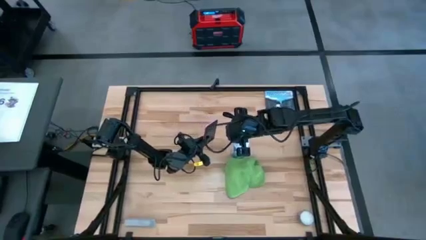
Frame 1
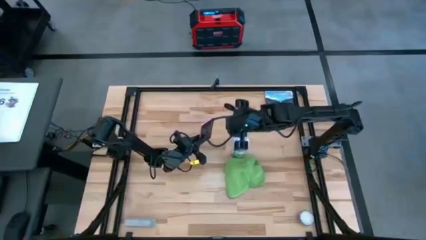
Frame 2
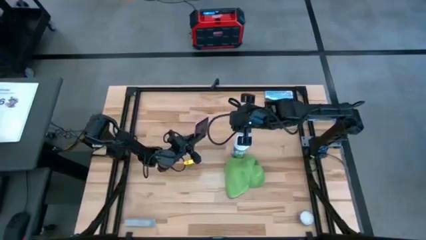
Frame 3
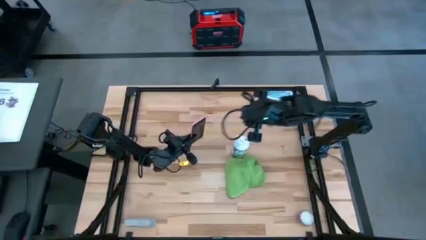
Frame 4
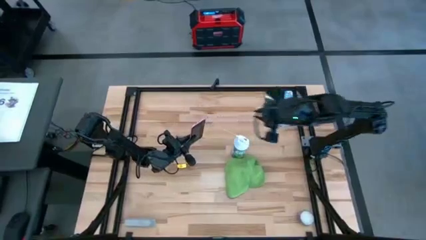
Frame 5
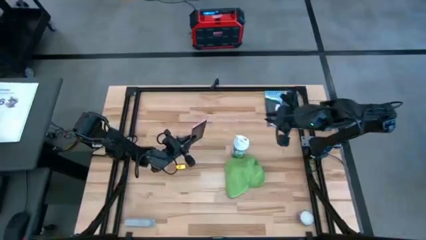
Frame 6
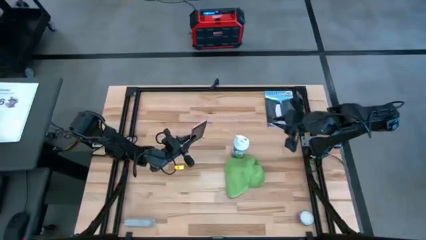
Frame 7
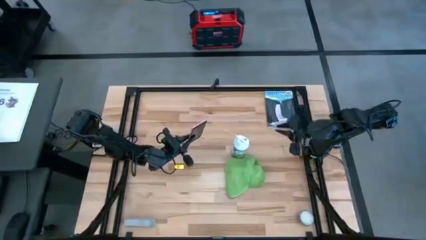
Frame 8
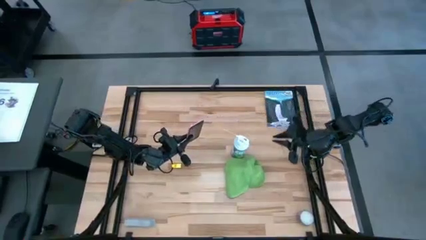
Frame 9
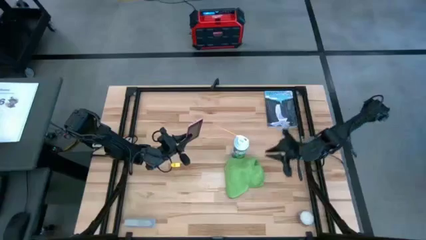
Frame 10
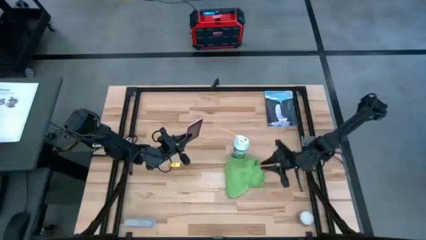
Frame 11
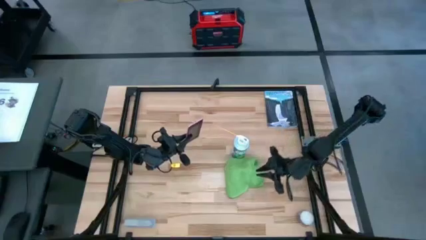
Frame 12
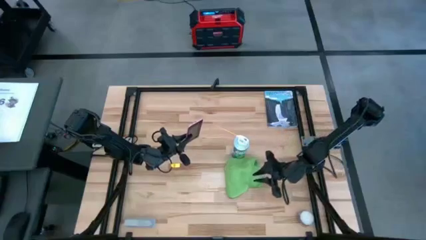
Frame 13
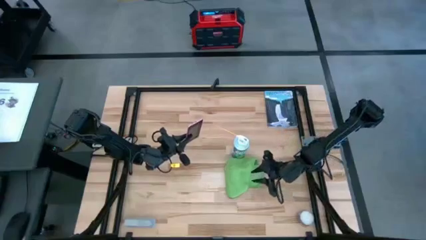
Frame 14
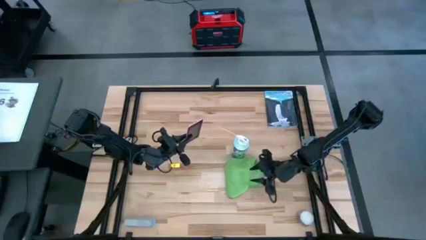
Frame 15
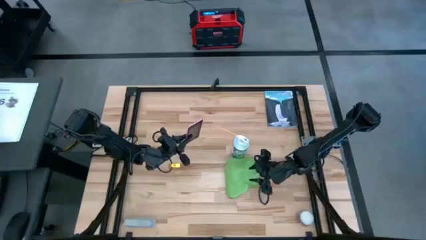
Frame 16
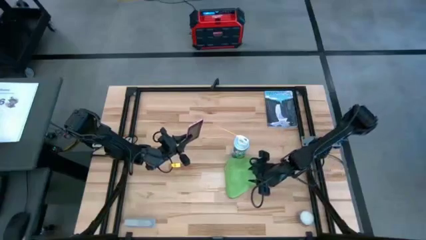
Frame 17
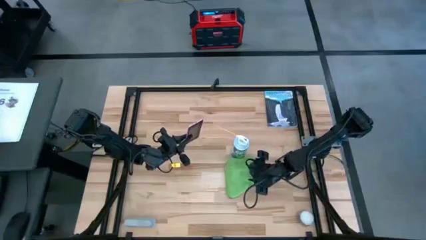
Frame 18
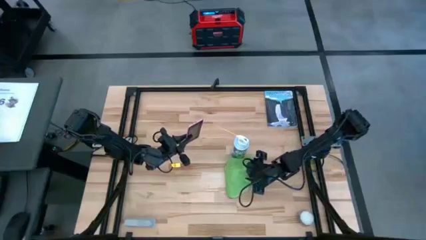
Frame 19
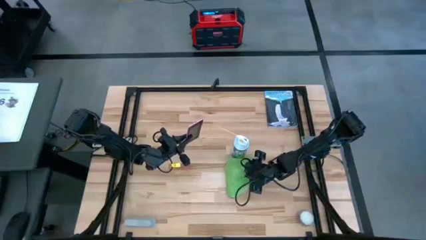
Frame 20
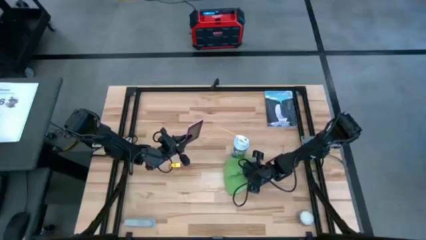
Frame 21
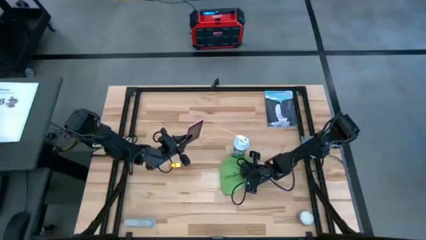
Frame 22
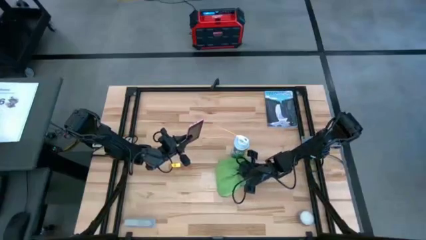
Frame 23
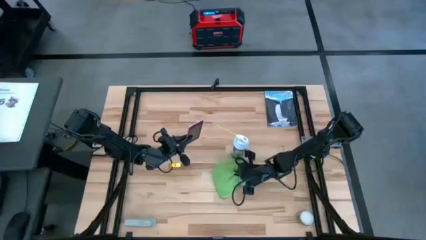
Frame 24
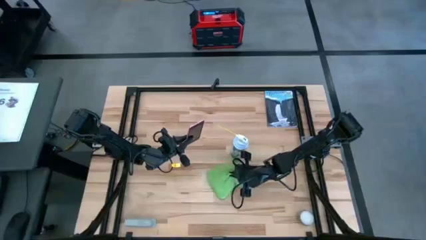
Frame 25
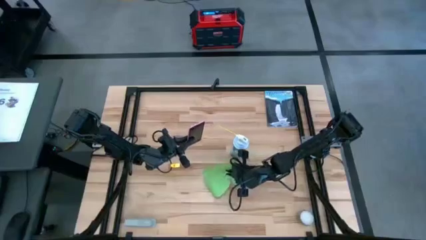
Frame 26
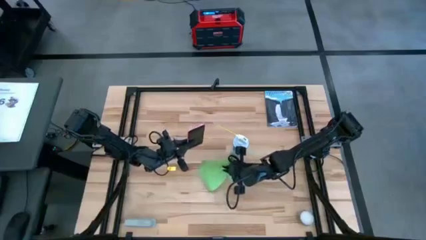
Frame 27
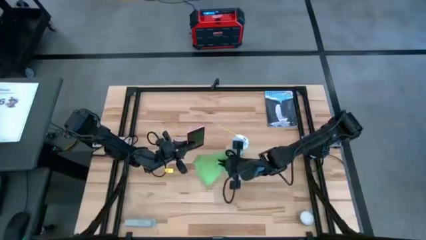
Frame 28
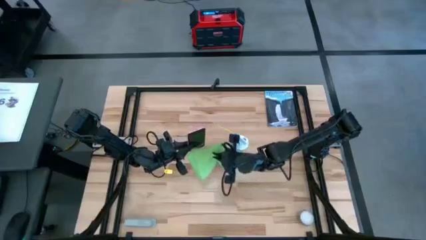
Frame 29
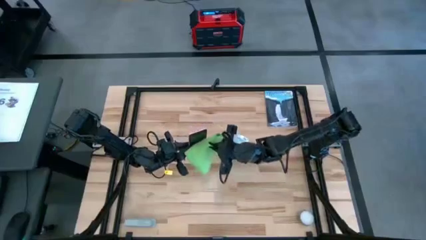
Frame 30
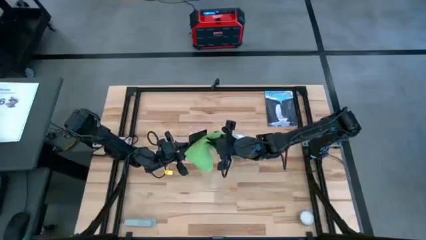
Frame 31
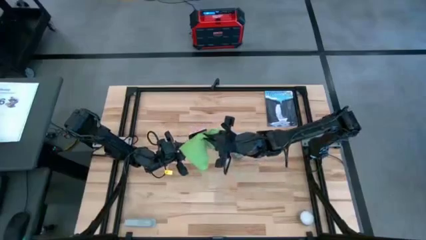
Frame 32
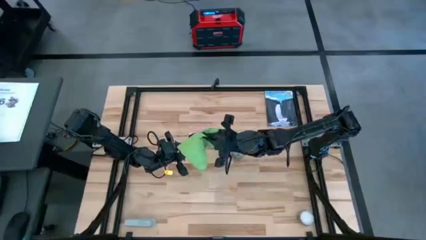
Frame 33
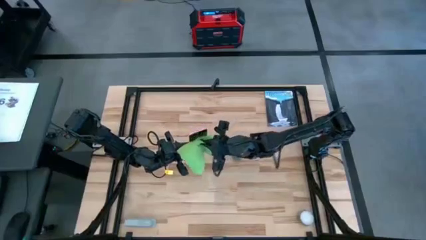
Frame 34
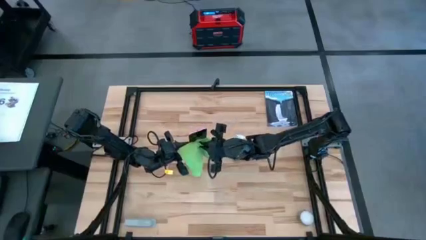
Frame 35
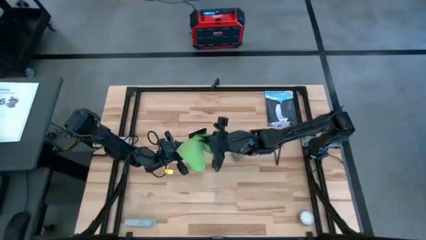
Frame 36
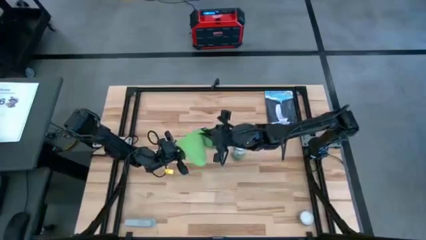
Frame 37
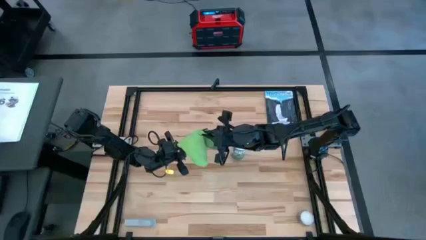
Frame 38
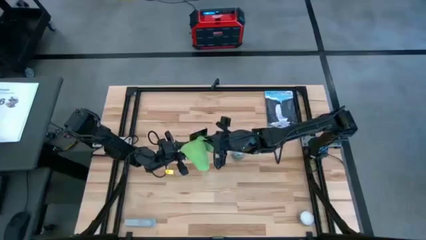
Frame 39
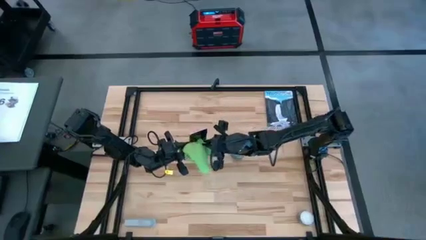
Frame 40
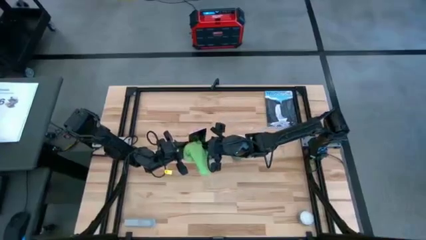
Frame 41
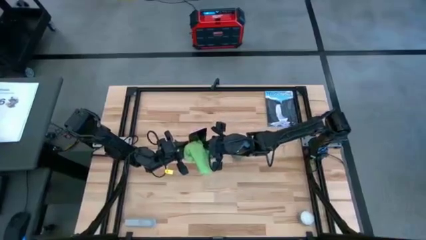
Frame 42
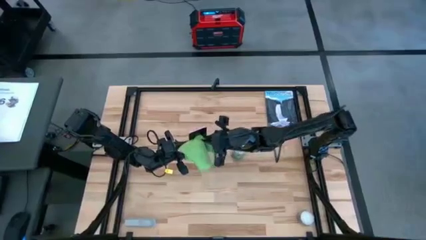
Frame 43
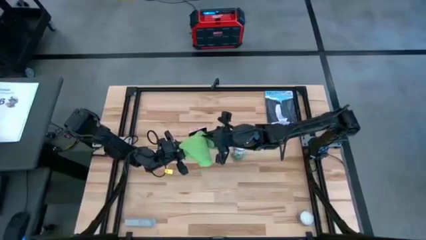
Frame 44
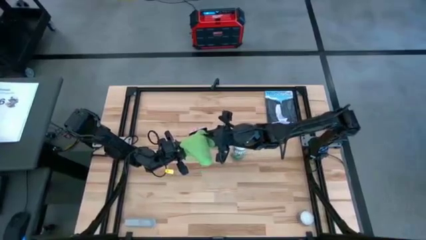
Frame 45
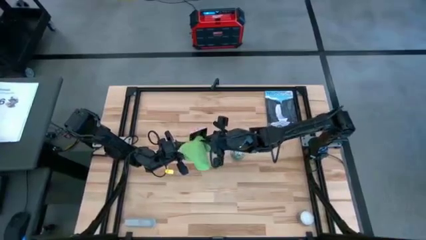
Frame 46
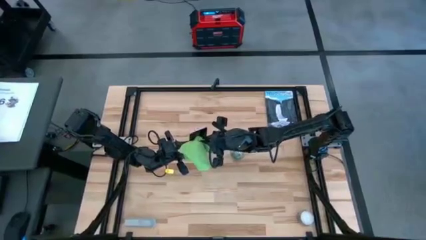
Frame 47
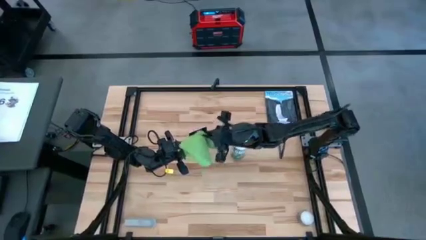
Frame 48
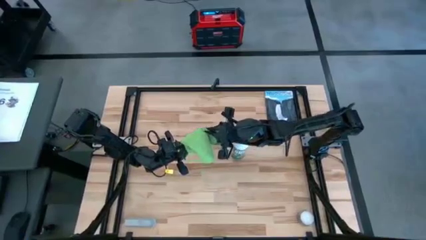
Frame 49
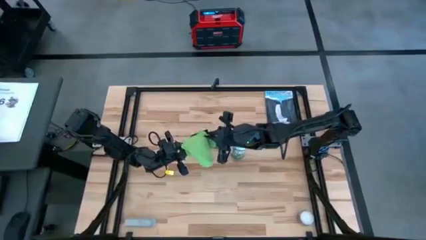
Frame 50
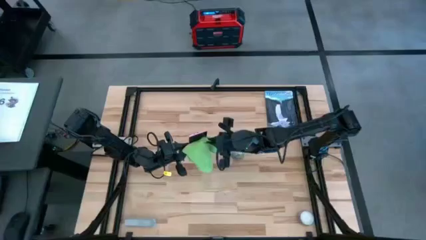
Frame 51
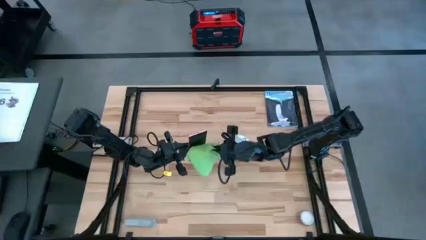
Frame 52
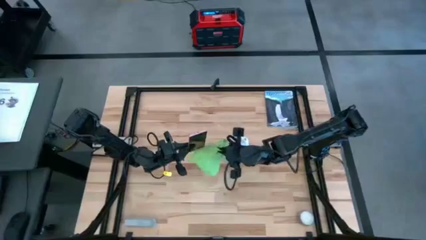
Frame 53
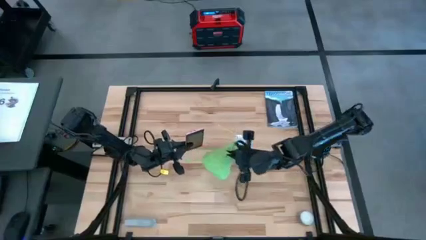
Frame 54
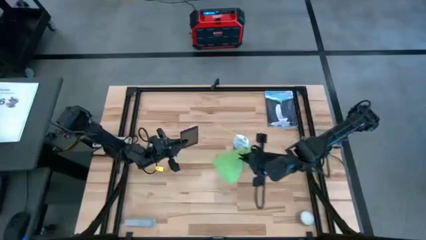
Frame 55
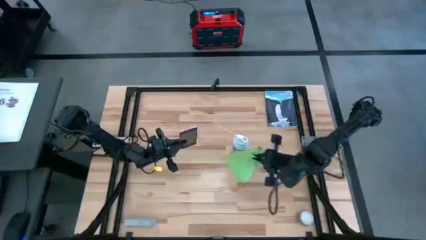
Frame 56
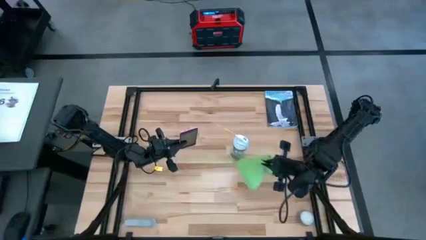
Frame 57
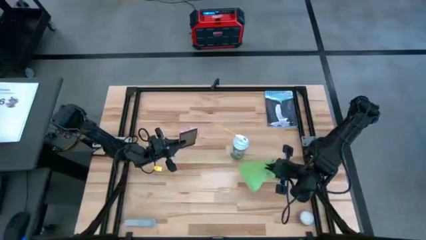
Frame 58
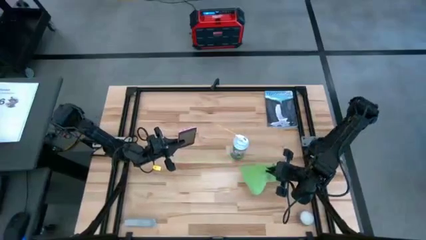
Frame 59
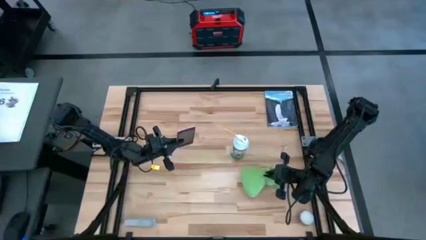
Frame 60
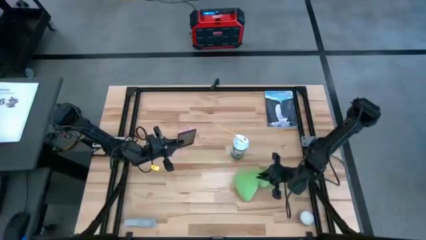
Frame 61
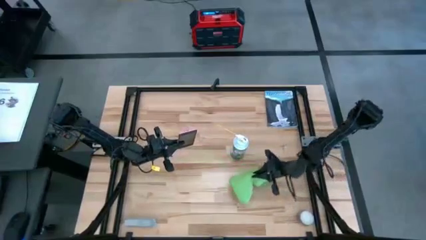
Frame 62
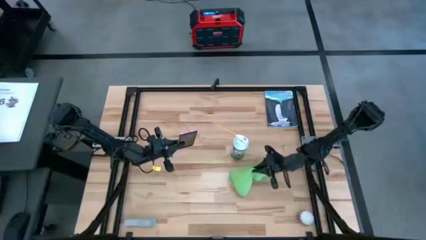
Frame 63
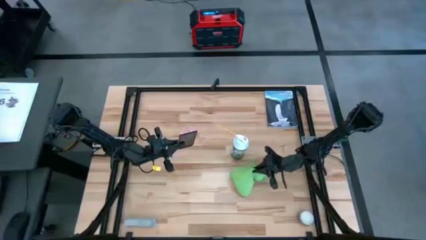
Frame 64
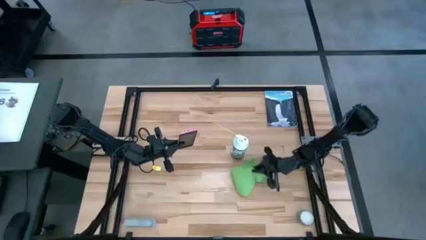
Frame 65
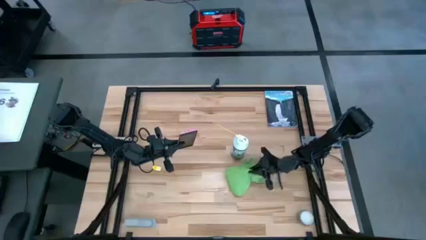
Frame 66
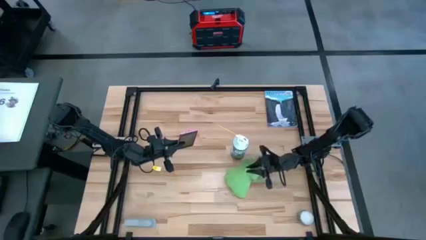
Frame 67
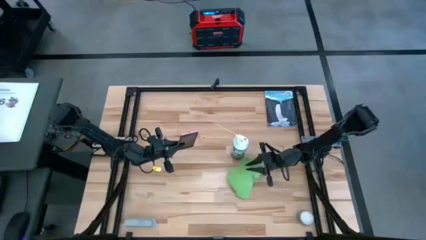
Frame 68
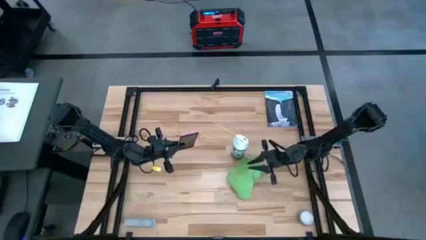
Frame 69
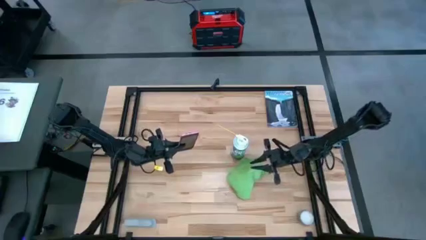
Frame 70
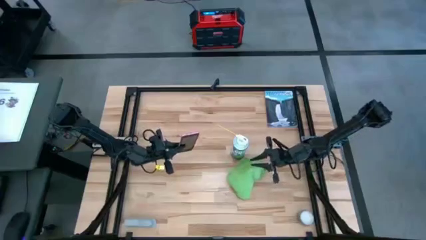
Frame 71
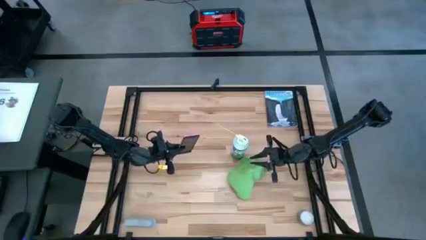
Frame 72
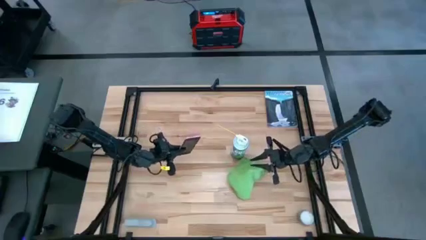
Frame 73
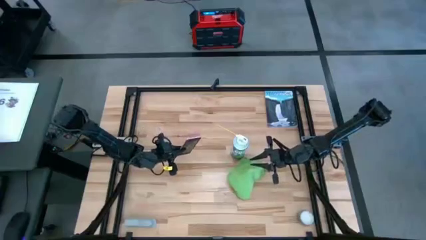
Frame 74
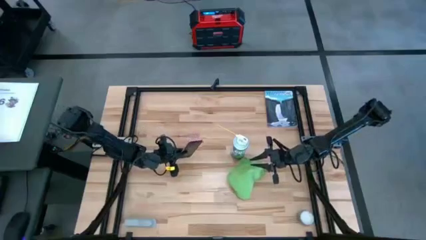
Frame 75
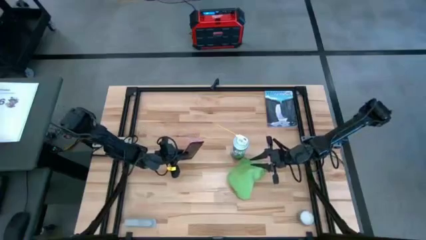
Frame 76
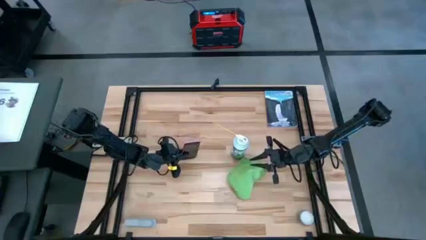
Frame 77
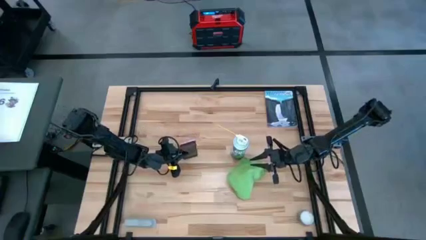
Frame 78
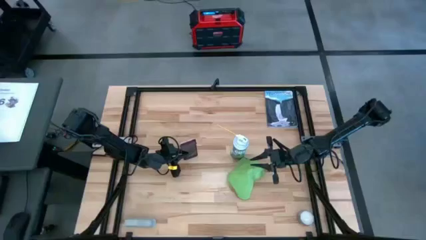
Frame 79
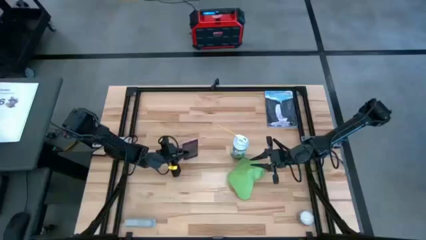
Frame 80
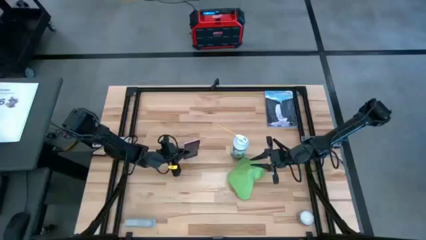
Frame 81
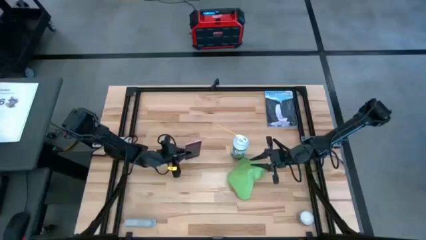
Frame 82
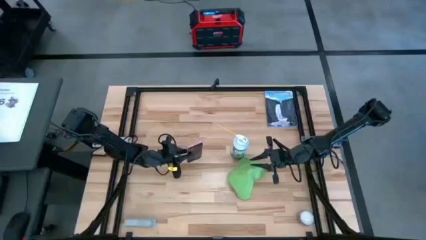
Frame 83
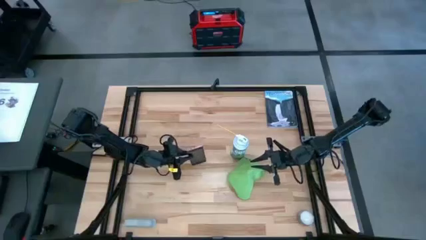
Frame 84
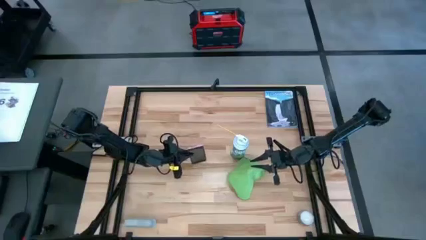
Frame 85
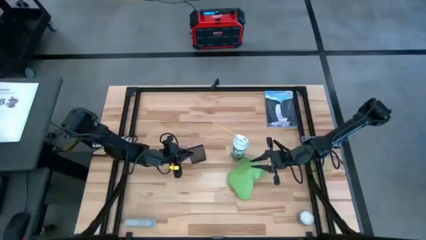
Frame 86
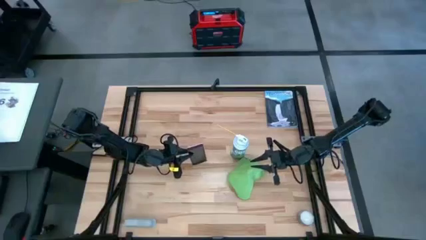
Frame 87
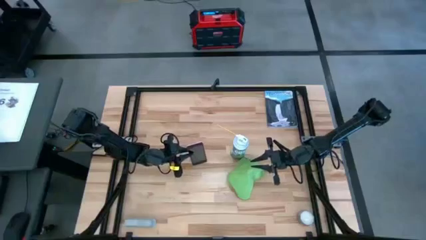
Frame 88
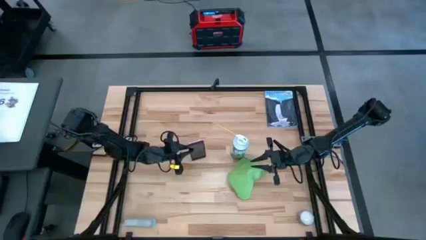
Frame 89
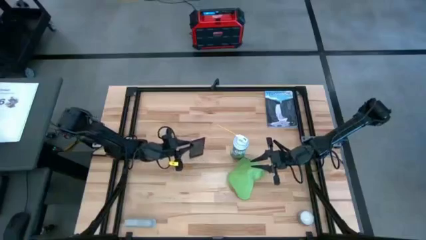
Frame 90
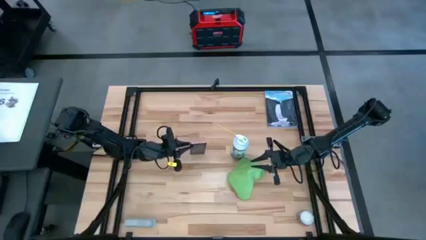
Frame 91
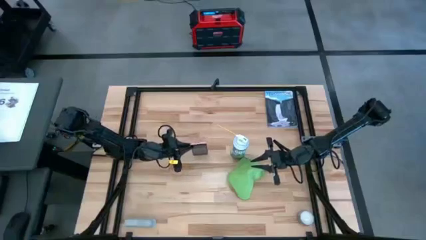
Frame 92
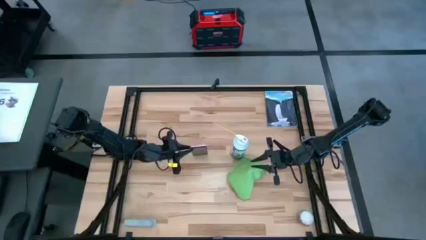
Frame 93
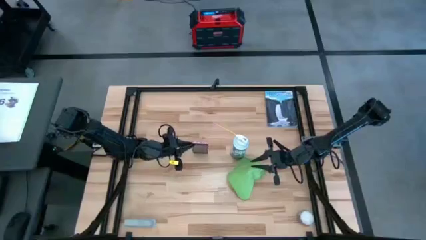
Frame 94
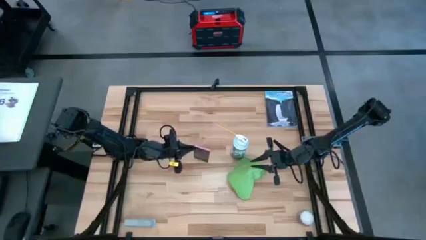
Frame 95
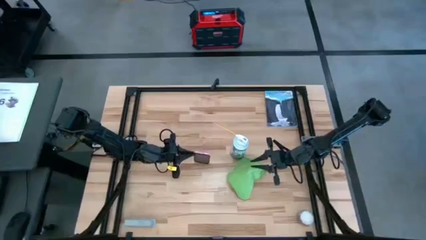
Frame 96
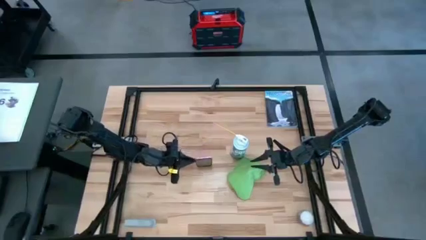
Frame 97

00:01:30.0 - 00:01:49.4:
Task: Apply microfiber cloth
Wipe the front of the pink phone using the green microfiber cloth
